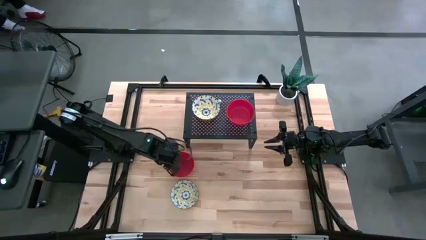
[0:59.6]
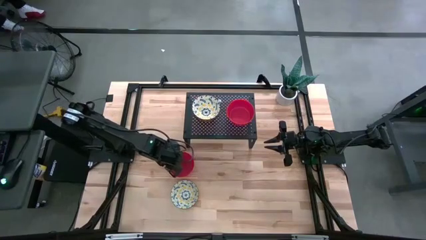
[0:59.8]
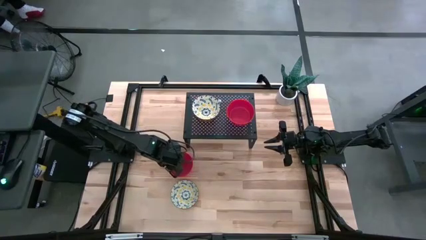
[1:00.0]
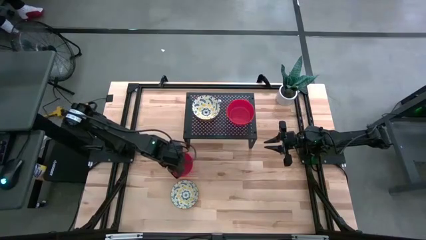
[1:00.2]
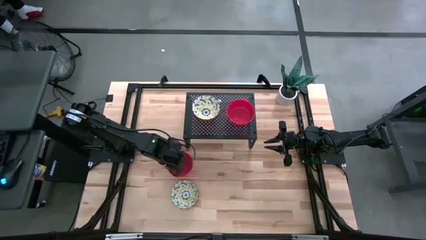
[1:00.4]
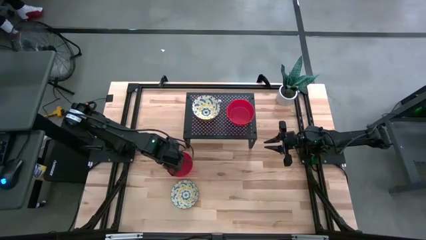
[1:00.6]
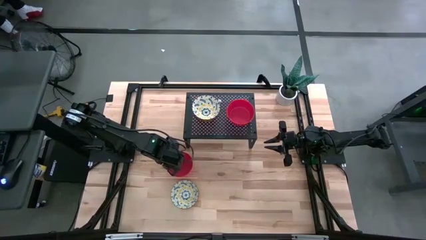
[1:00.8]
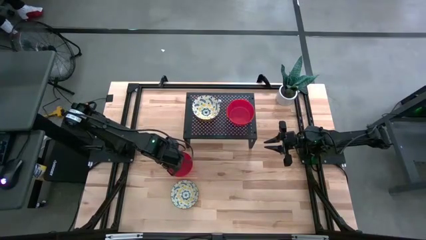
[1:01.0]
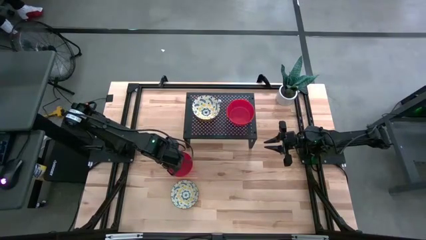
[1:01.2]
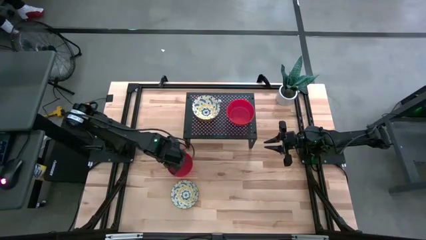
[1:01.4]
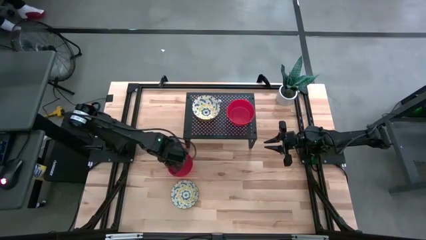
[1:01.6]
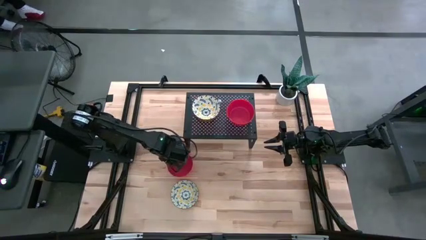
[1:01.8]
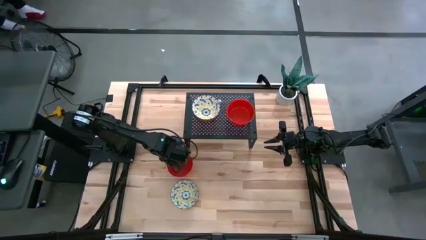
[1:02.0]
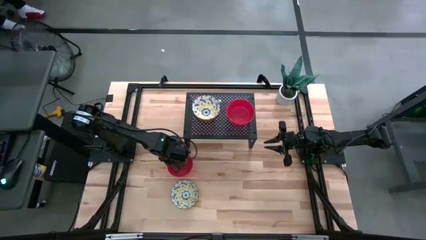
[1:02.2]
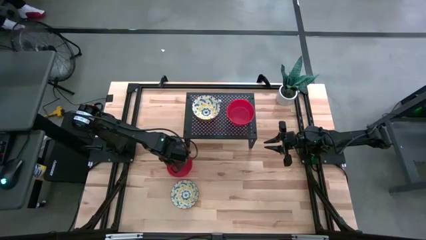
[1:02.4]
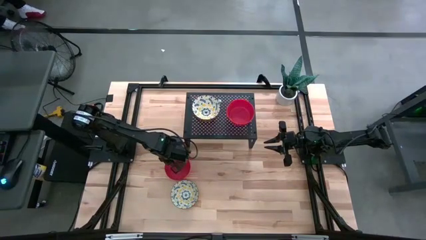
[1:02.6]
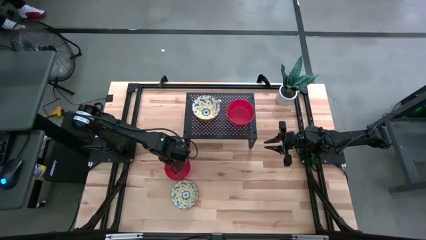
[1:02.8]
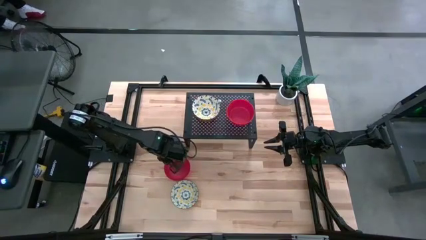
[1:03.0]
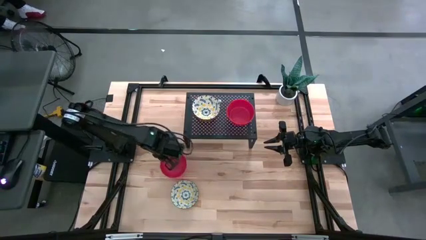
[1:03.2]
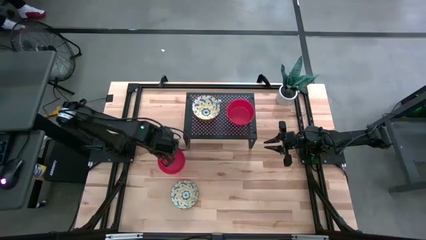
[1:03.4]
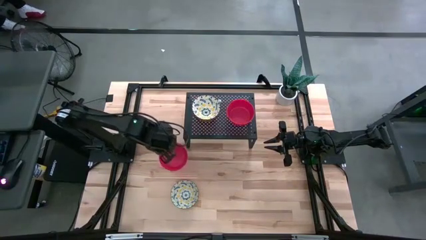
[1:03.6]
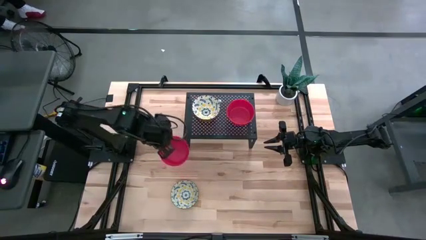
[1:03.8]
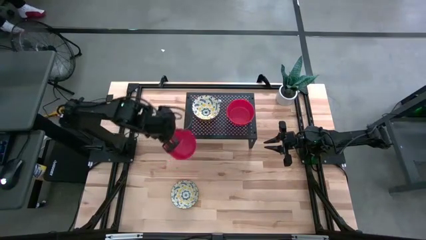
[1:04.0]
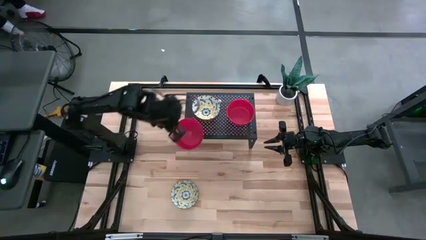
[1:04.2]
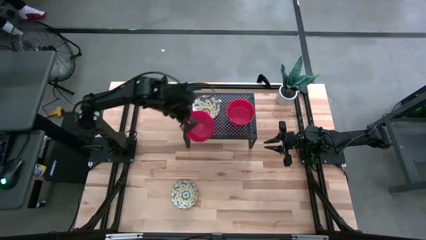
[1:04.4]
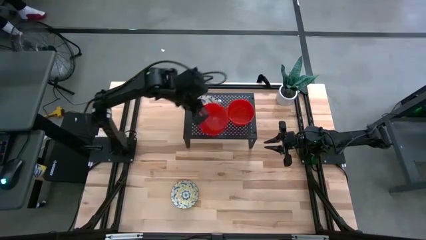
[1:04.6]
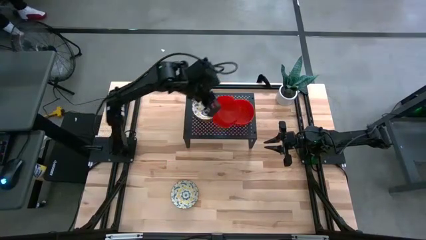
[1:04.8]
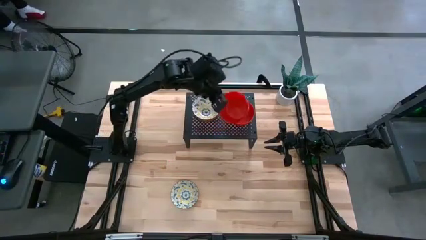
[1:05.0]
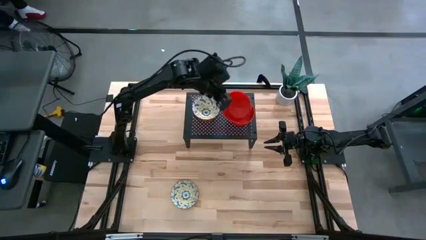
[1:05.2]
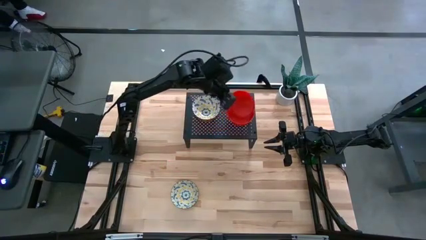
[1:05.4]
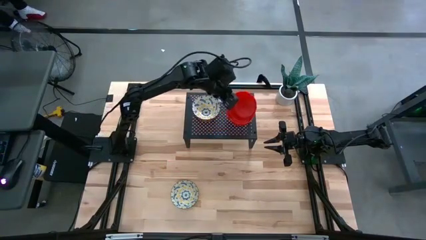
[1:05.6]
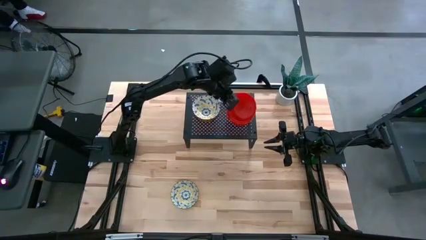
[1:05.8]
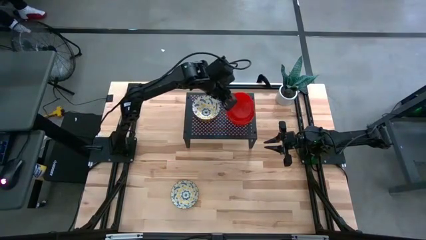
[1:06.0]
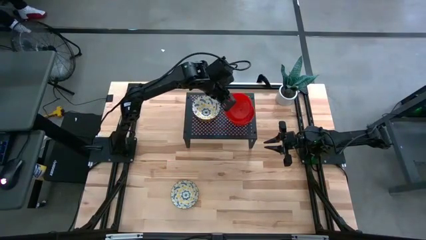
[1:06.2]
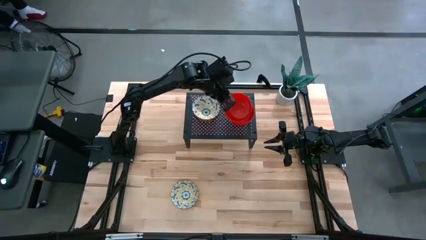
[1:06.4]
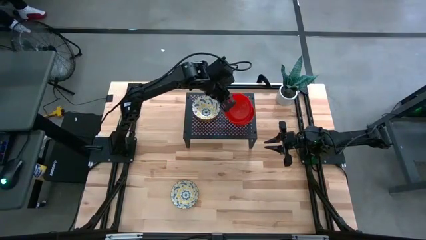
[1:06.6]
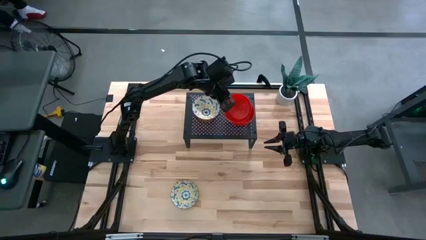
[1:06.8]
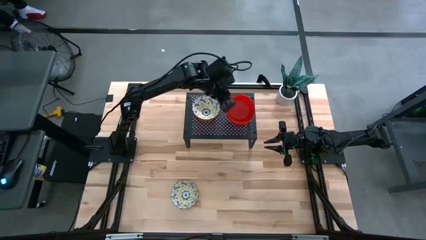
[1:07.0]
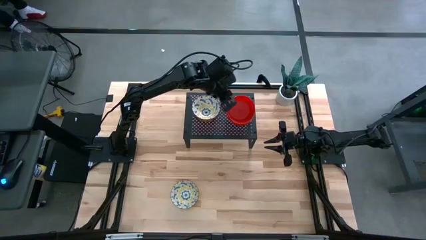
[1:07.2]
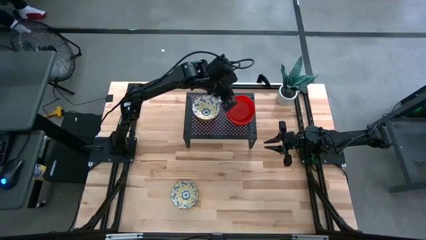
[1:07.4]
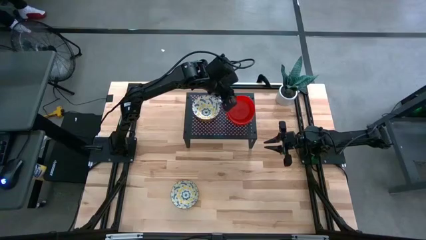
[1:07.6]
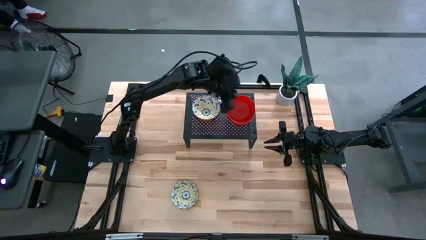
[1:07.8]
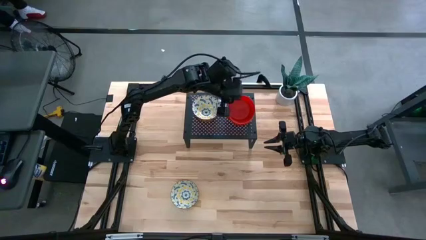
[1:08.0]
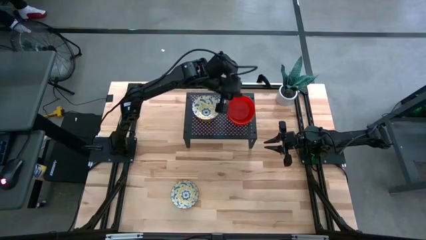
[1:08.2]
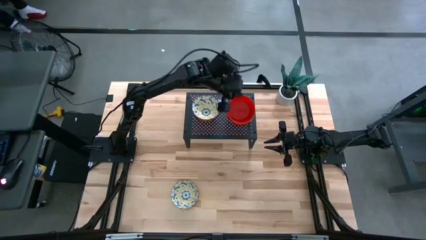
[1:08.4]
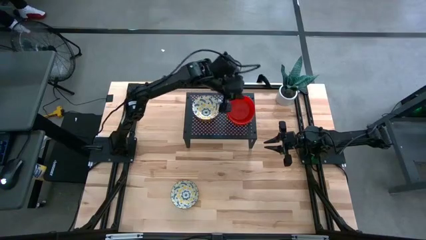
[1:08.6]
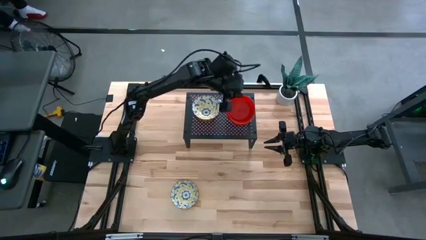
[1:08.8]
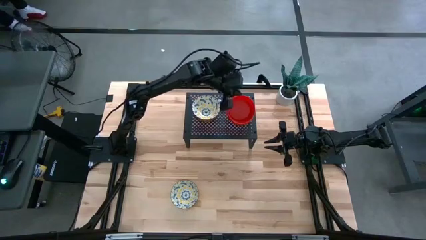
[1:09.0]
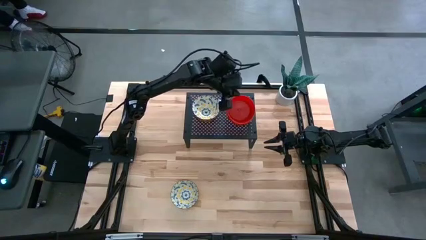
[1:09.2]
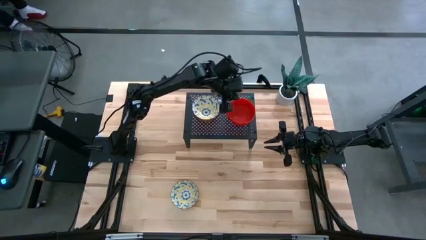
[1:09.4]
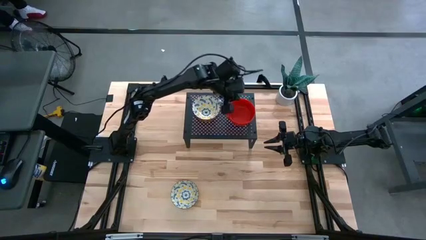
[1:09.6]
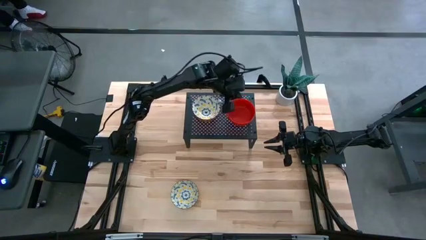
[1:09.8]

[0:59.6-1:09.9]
Task: Pick & Place Mini bowls
Stack the red bowl on the red bowl on the shelf

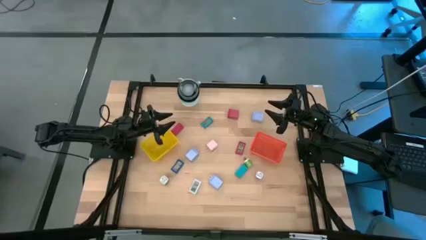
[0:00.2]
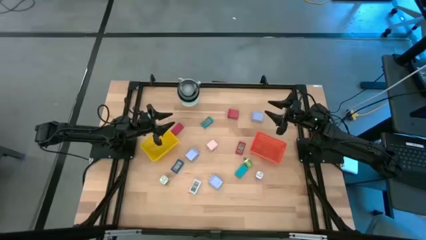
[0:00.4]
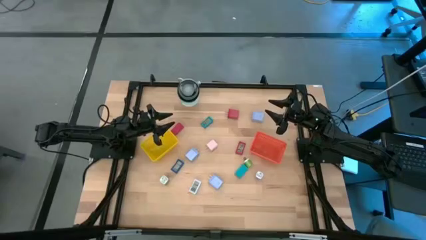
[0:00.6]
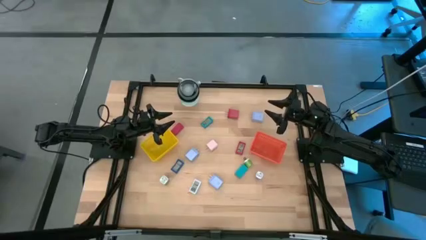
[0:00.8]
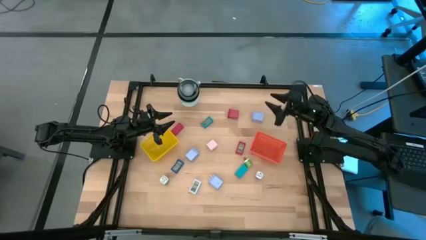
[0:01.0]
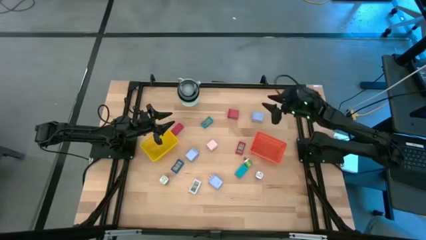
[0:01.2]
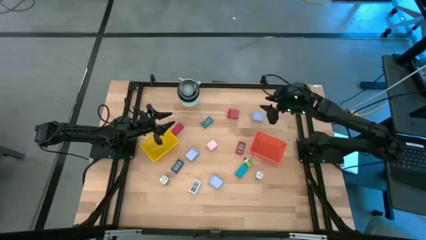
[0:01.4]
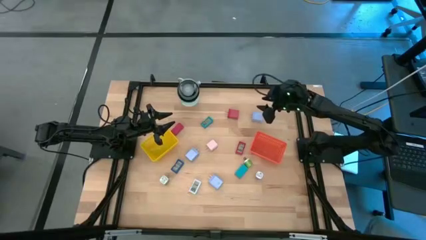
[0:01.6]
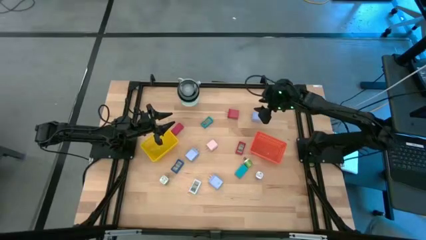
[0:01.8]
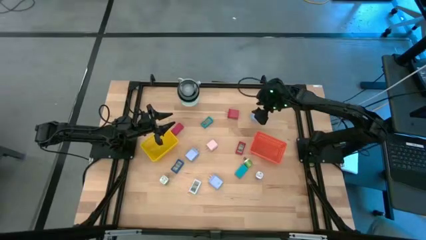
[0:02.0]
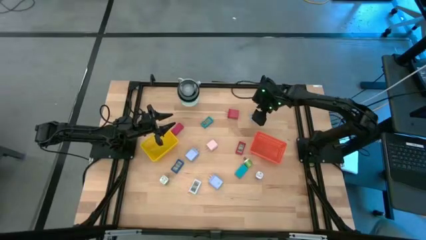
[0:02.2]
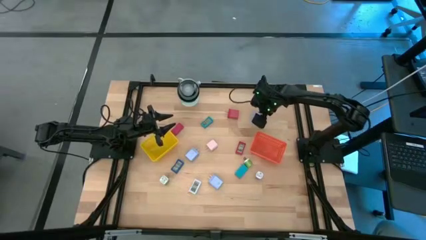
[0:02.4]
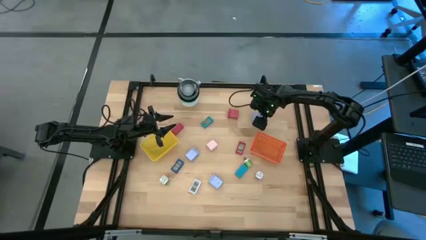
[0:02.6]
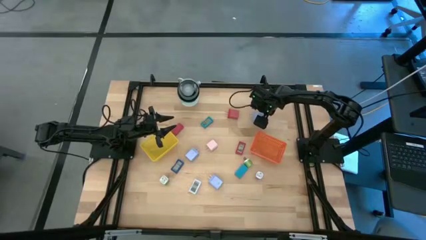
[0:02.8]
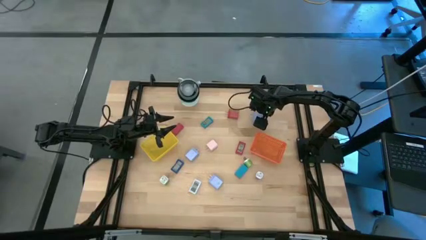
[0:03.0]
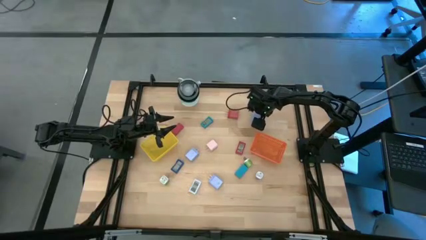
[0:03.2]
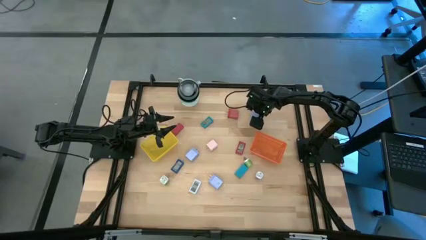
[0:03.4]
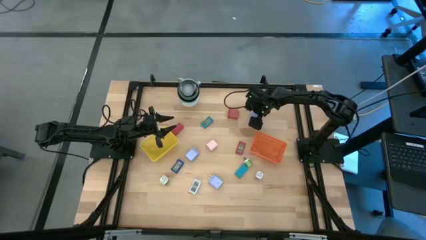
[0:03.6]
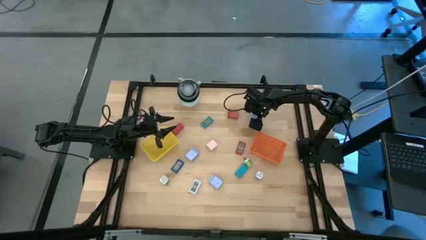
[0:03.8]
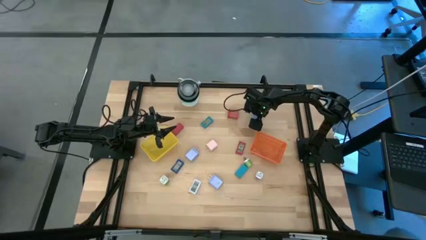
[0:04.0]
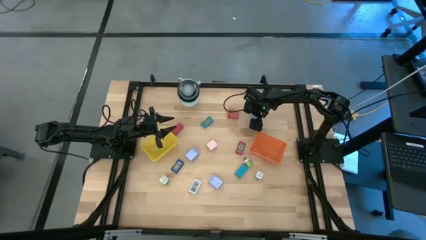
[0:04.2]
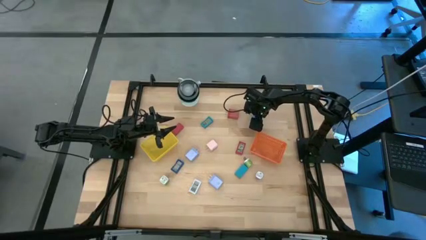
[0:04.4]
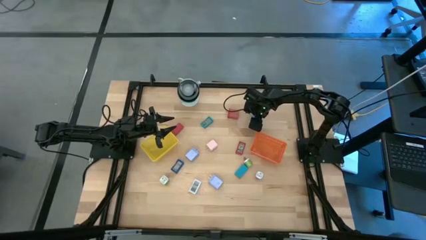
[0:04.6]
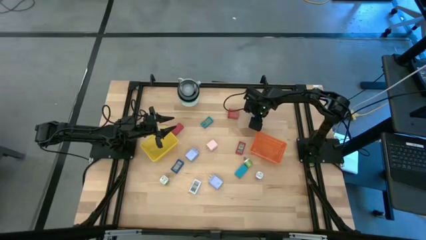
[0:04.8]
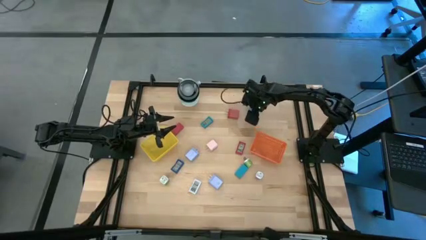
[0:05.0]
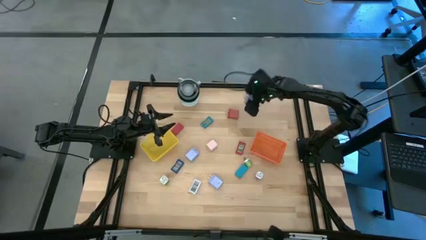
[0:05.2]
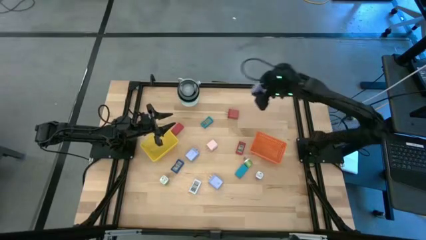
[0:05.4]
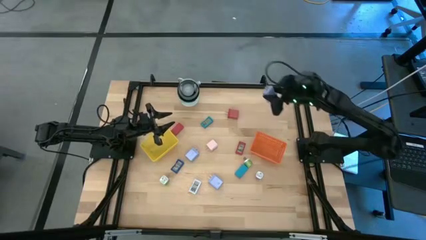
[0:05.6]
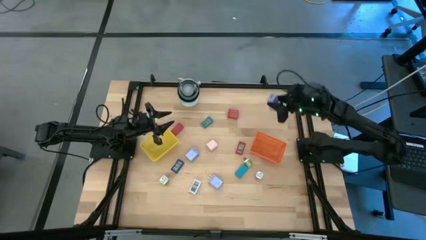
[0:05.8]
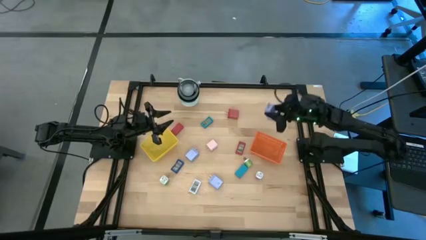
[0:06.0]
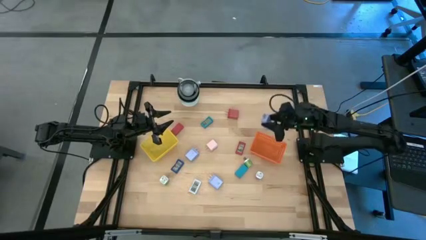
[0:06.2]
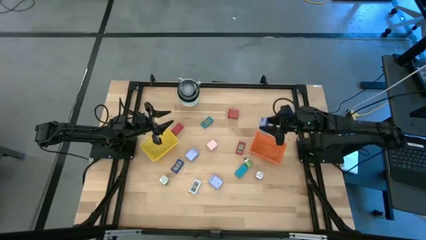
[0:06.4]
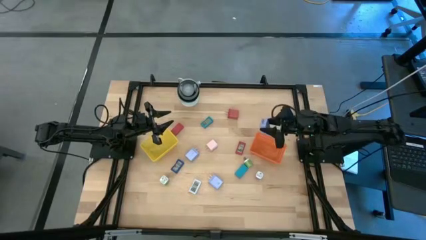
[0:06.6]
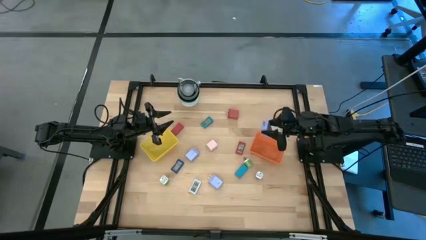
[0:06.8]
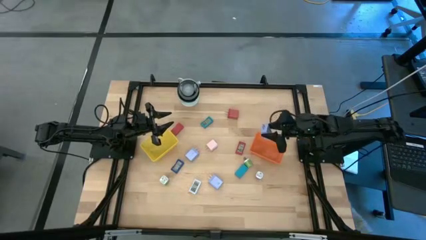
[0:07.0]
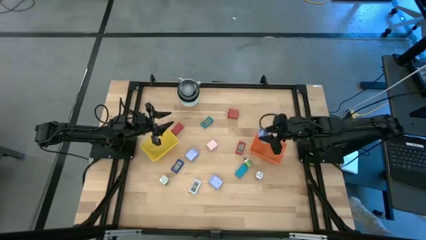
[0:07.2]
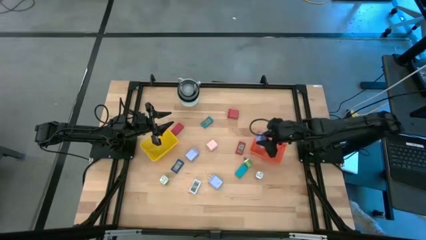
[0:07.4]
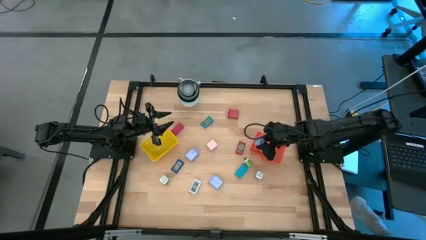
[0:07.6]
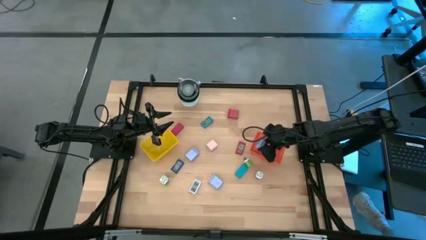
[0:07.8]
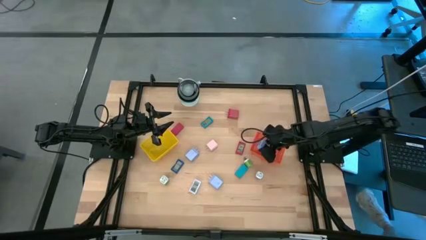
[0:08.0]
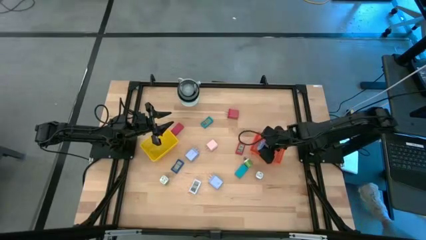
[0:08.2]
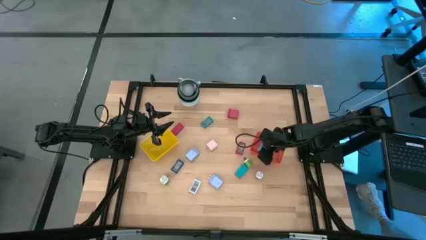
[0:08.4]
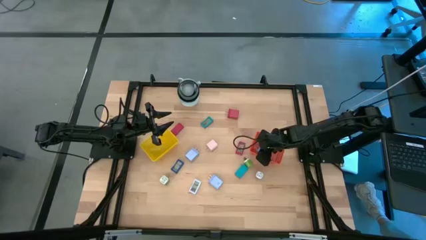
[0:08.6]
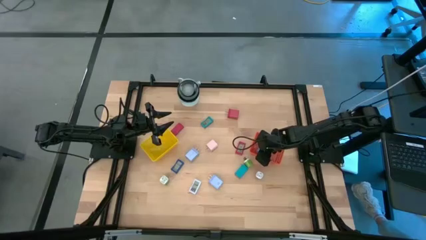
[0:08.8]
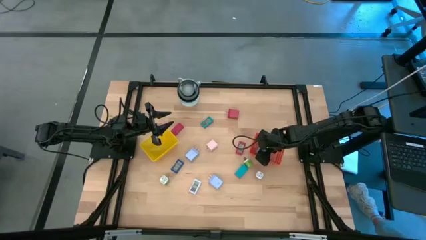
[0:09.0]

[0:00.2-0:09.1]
Task: Pick & Place Office items
Put the top blue charger adapter into the orange basket
